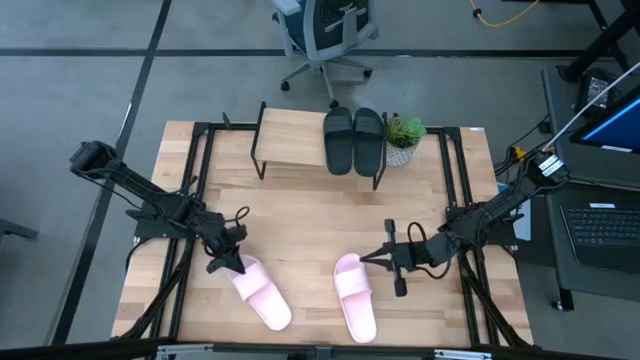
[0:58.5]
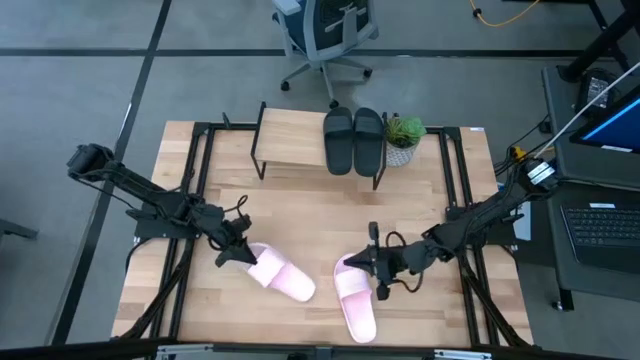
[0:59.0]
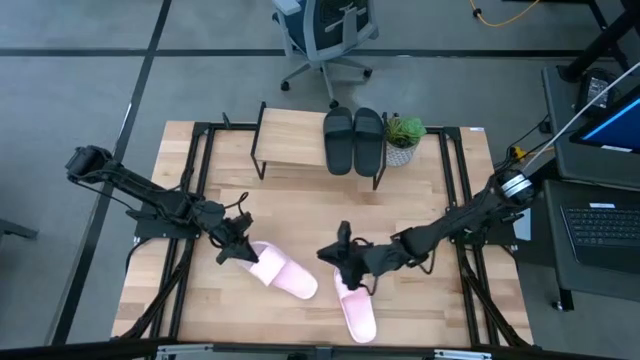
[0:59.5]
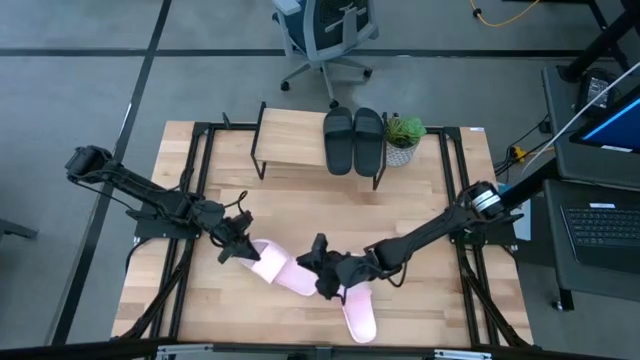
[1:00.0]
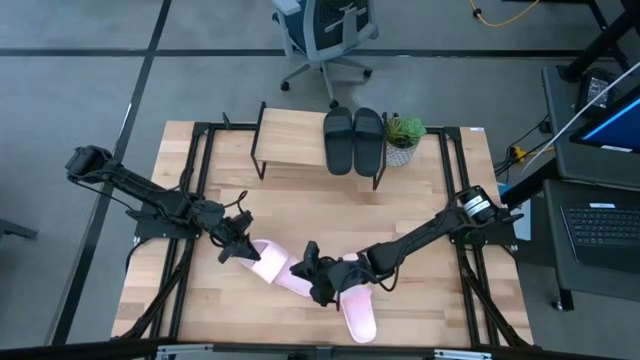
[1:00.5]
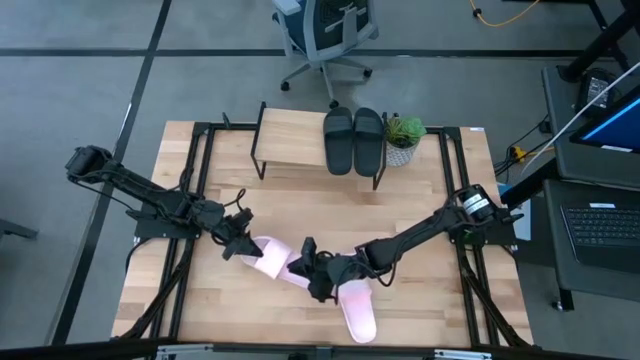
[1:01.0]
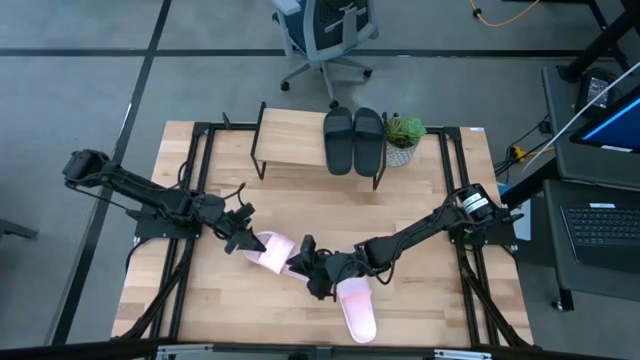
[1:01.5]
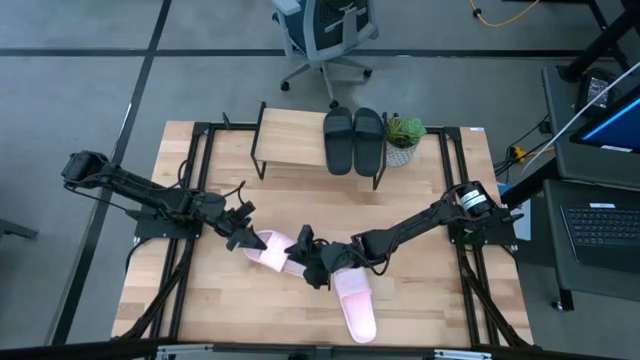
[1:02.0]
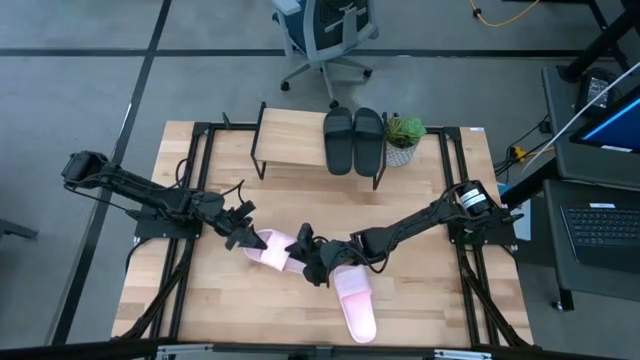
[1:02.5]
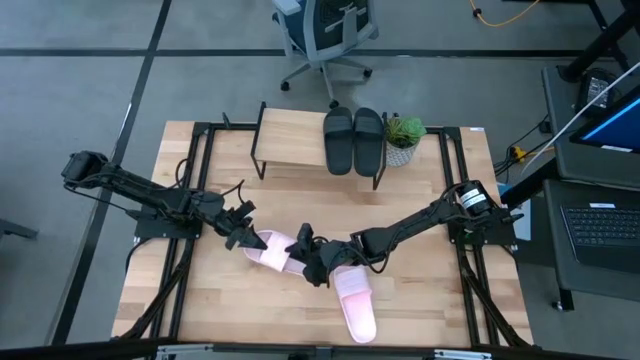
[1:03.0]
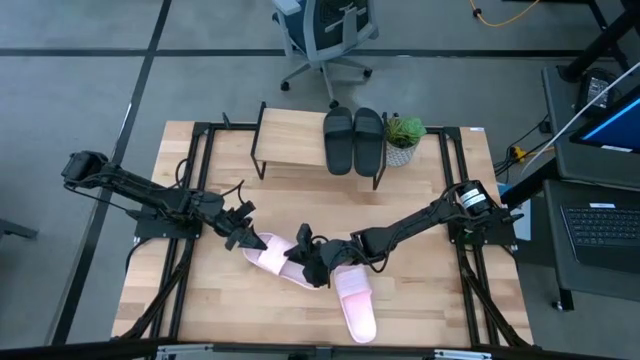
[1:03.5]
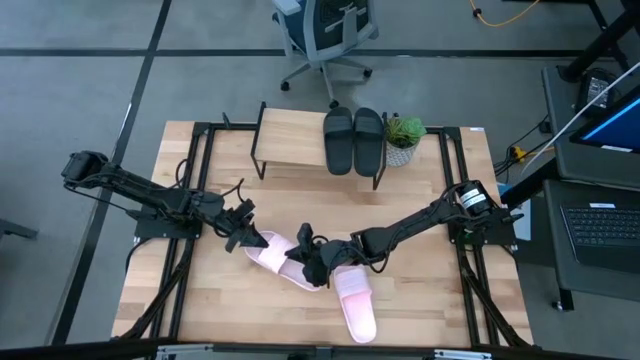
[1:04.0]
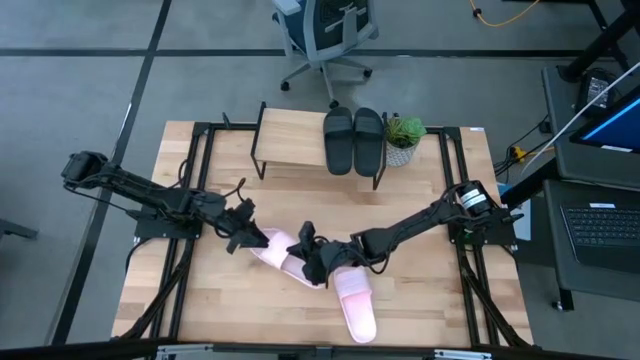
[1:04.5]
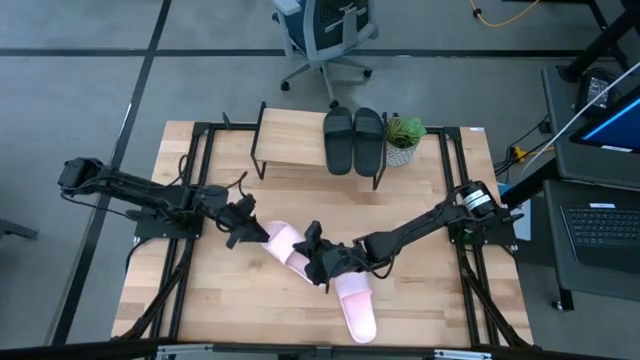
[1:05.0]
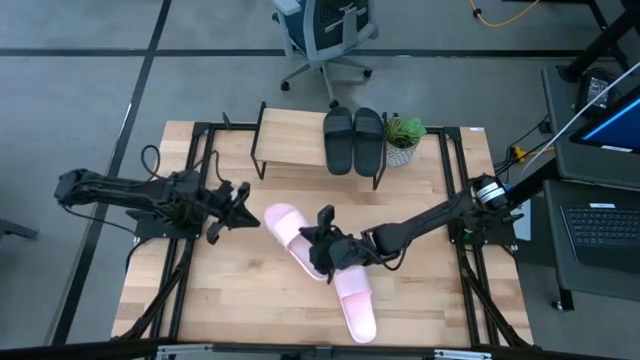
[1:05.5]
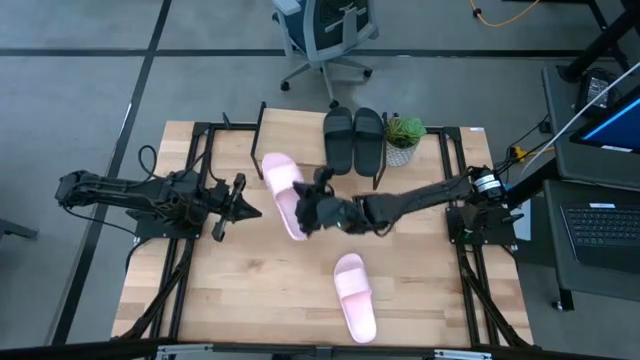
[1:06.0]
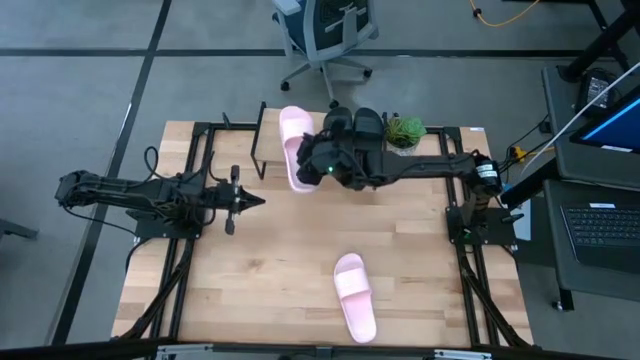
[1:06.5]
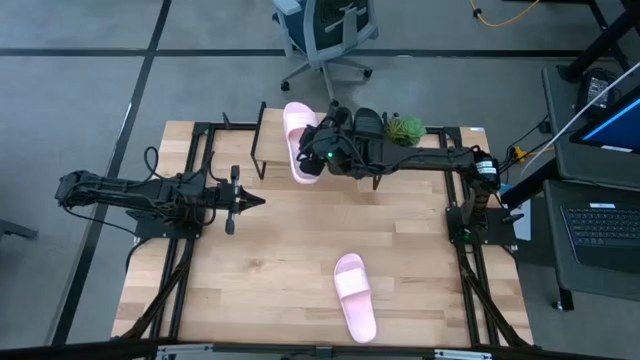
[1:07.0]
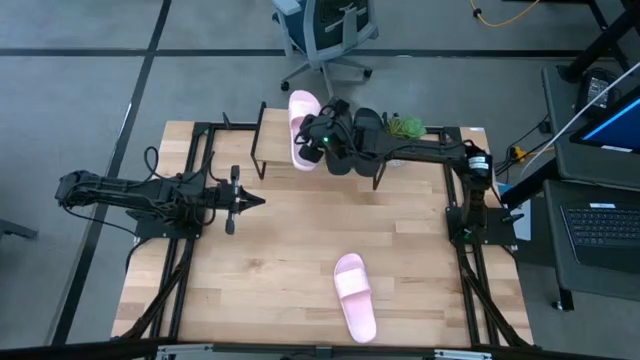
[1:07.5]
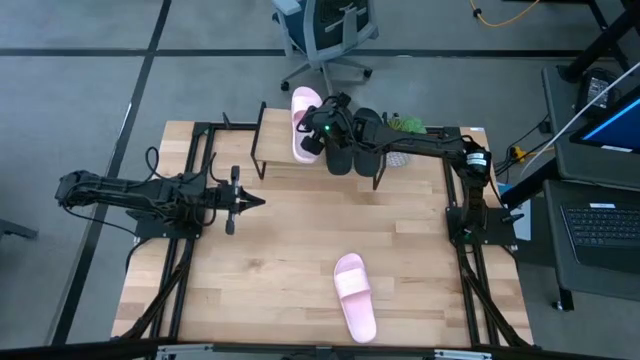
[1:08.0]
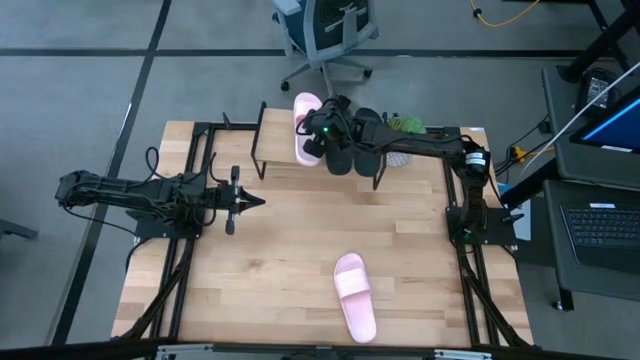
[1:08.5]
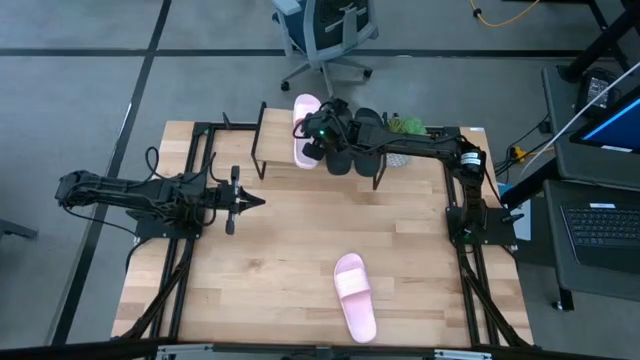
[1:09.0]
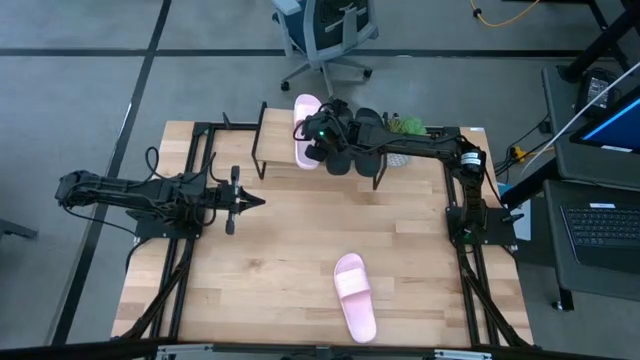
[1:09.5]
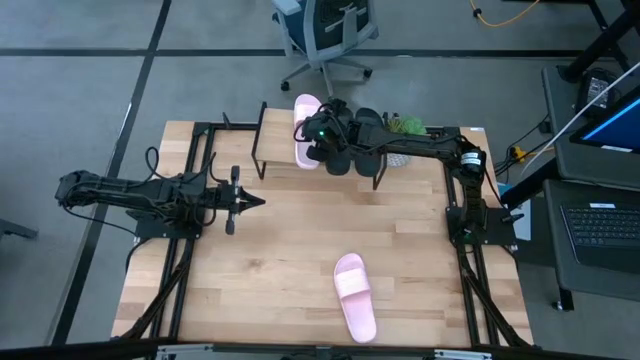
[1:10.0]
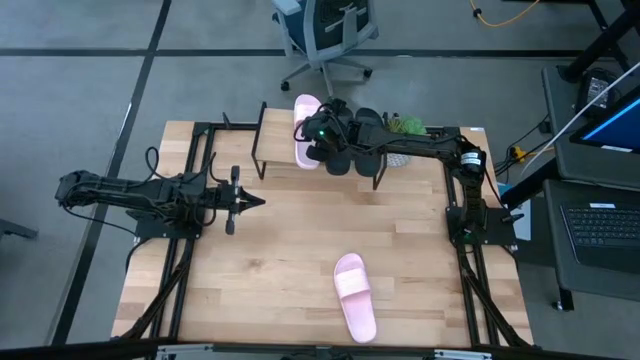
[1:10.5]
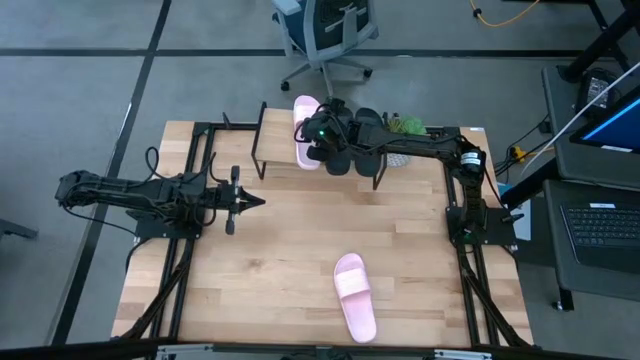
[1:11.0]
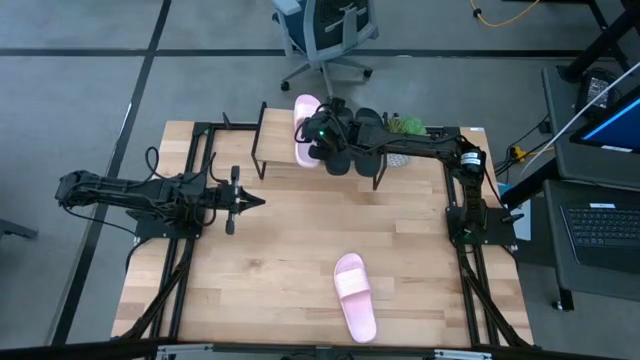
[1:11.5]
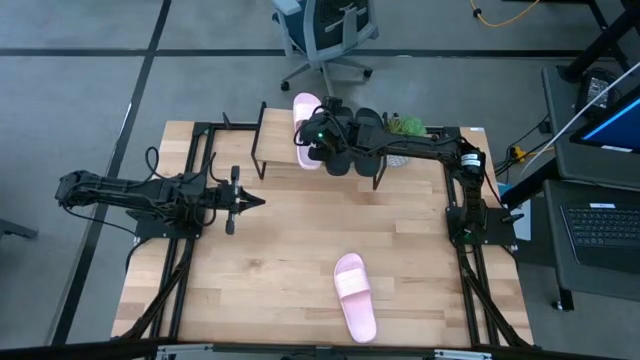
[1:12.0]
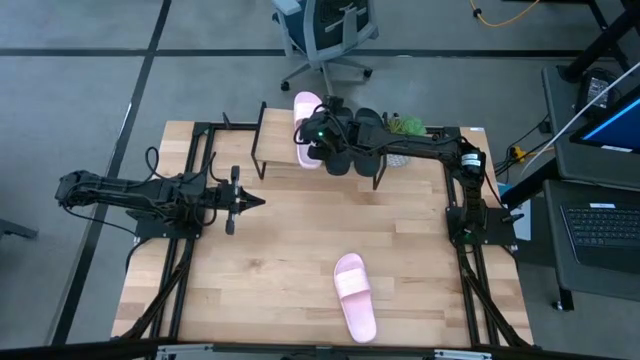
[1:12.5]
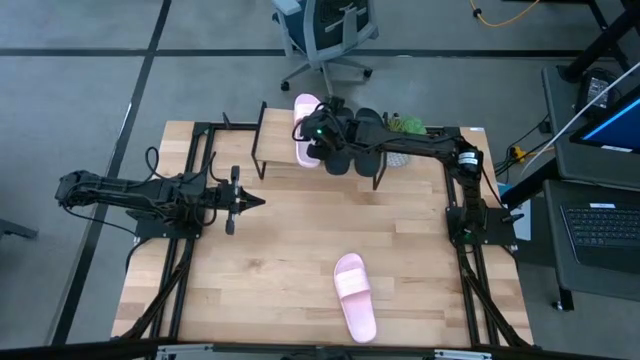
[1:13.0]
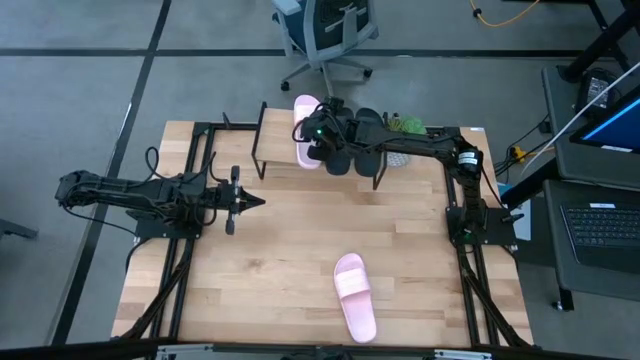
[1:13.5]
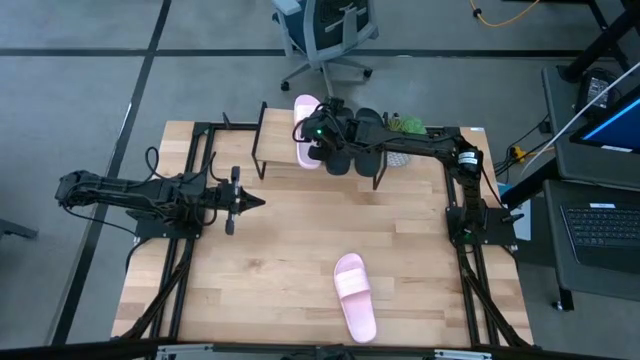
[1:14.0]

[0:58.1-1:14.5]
Task: Pick and place slides into the shelf
Put the left pink slides on the shelf

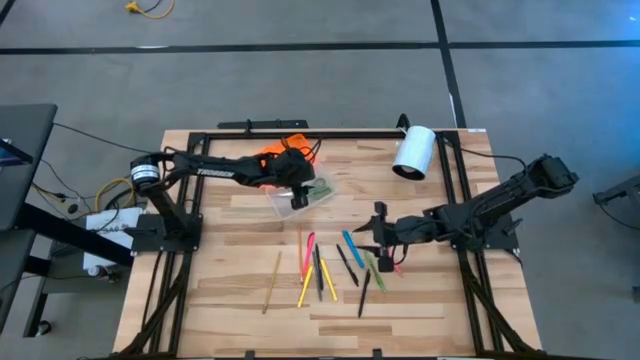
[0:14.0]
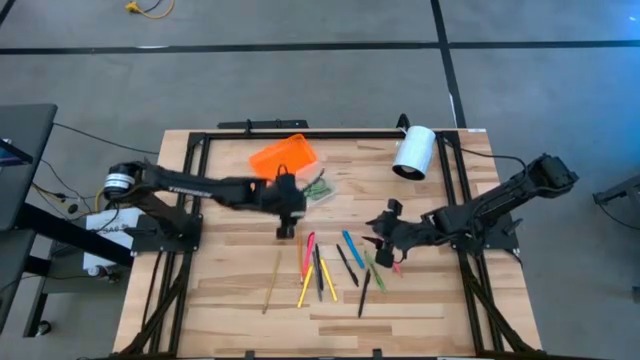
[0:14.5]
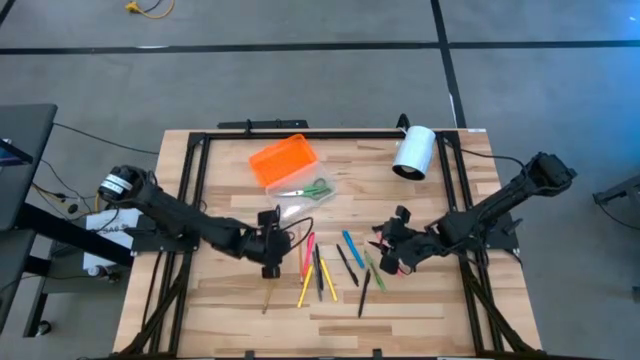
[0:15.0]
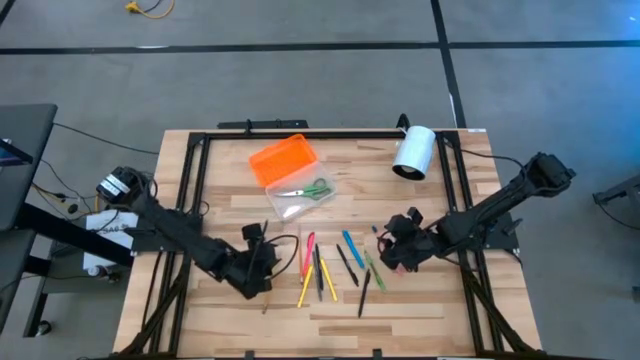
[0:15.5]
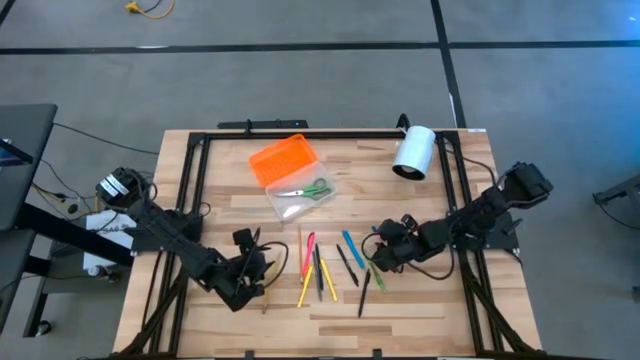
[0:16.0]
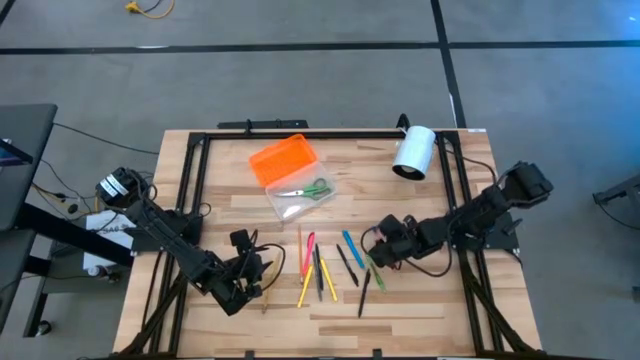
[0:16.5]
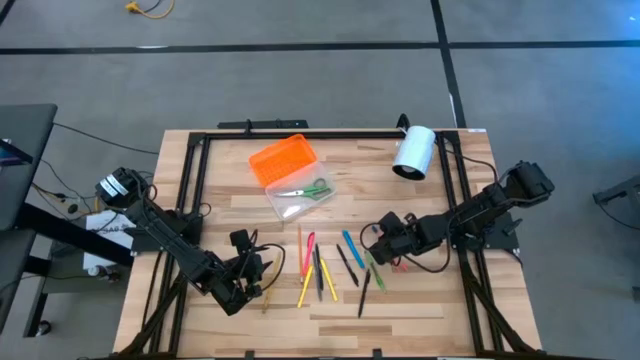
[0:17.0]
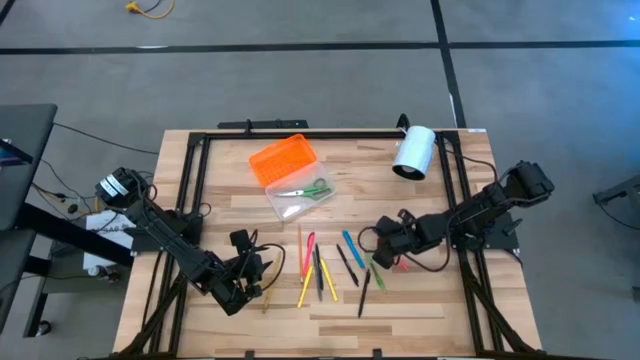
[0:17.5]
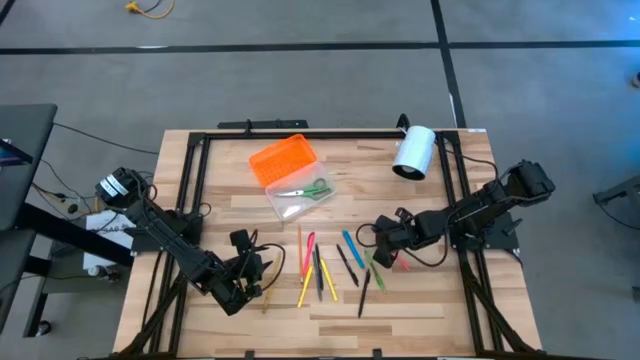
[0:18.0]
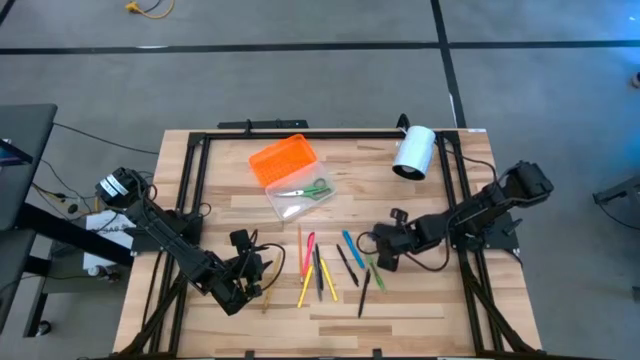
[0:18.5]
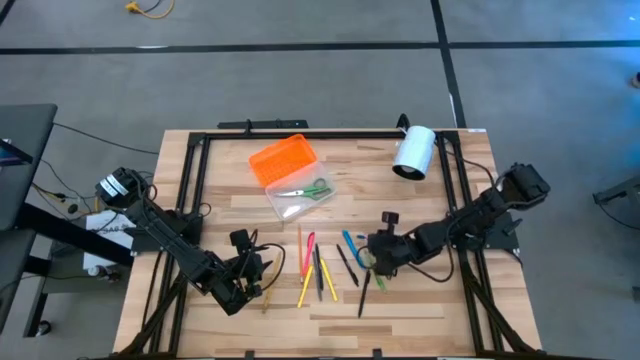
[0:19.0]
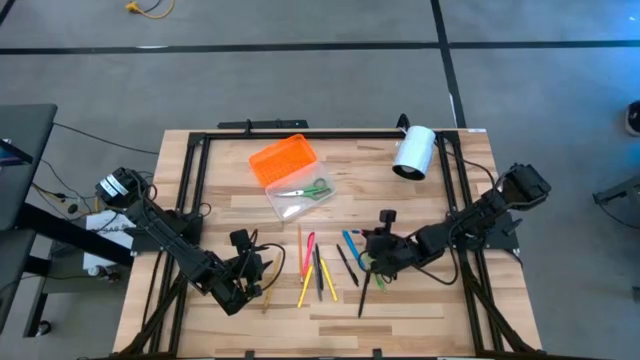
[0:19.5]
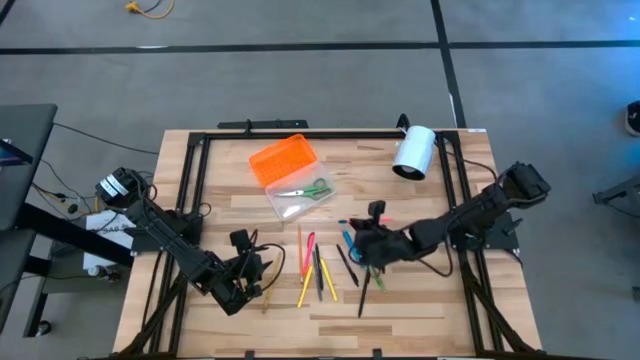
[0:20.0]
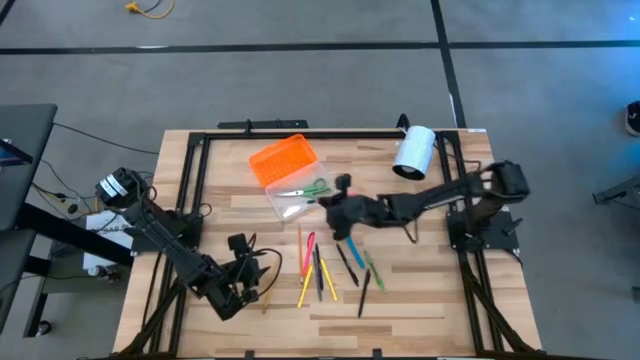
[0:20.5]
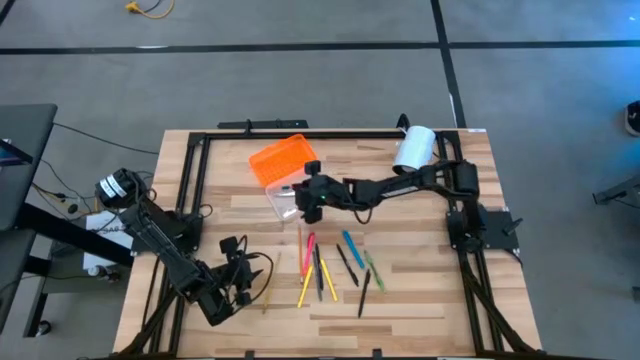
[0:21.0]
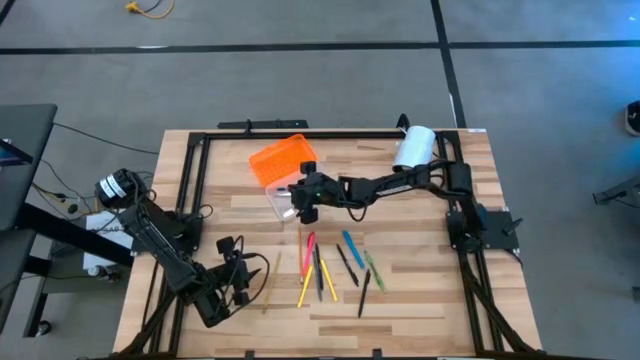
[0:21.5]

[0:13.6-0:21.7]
Task: Pick & place school supplies into a supply box
Put the pink pencil into the supply box
